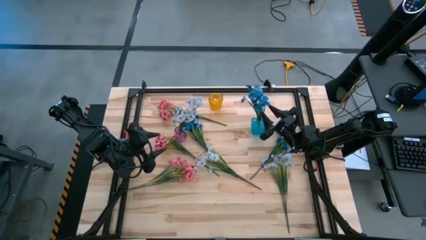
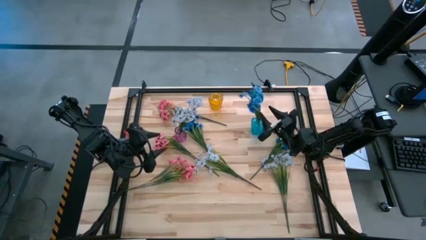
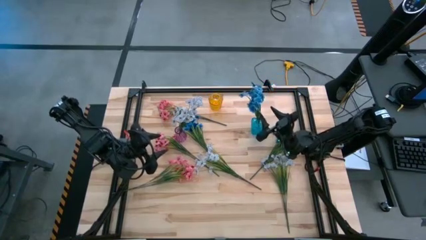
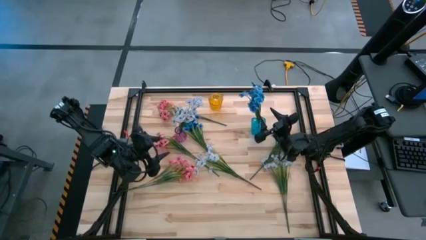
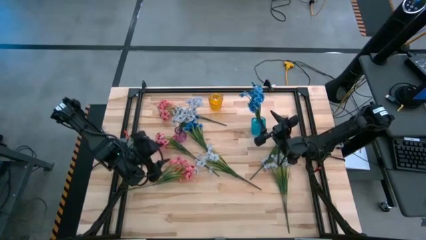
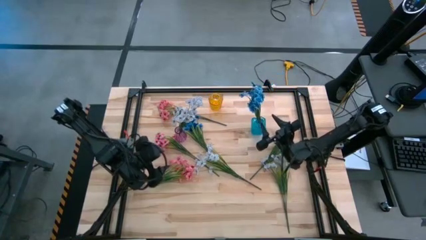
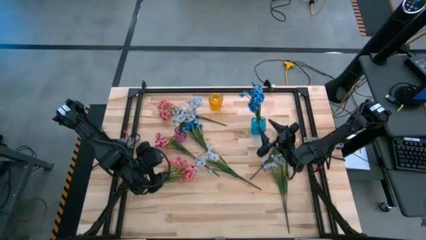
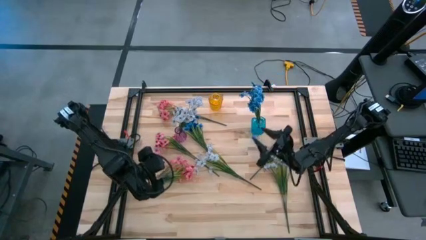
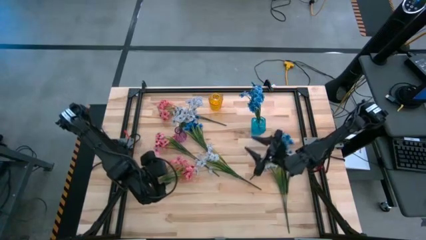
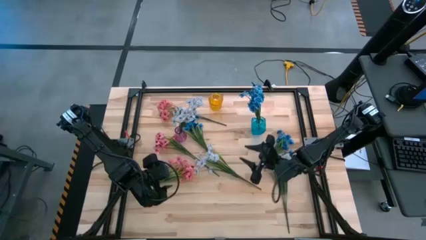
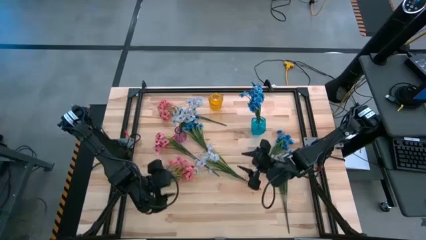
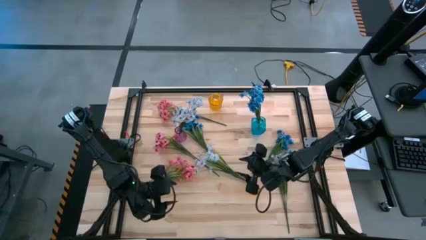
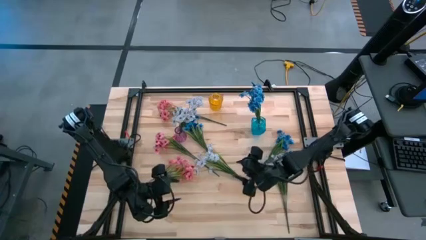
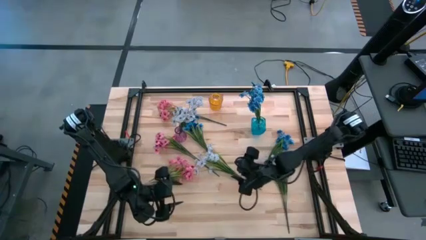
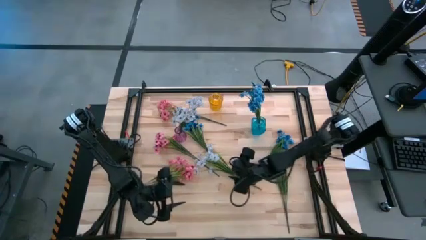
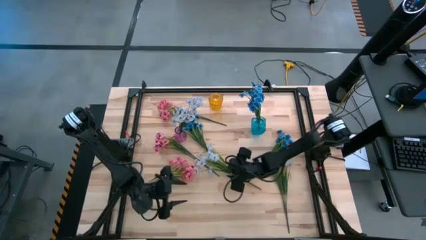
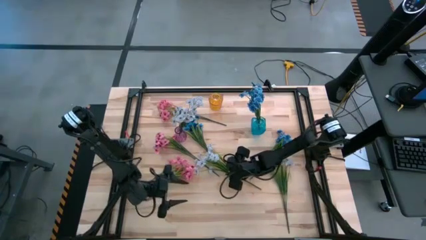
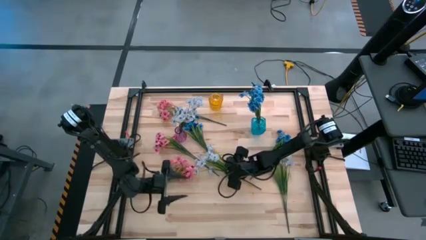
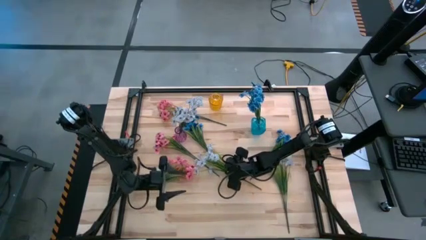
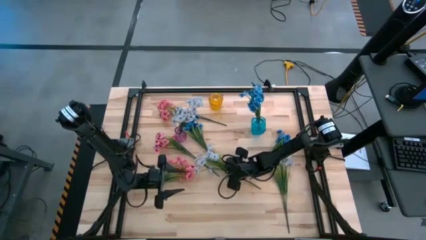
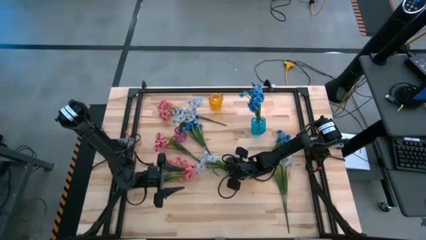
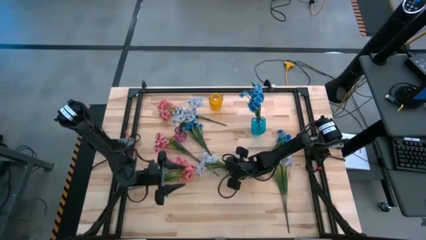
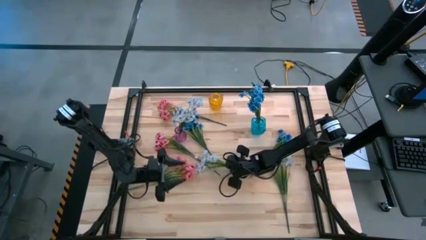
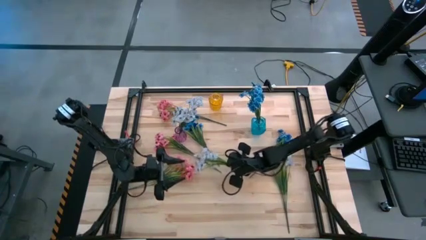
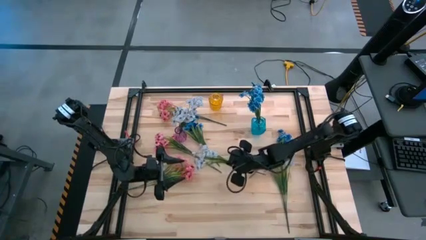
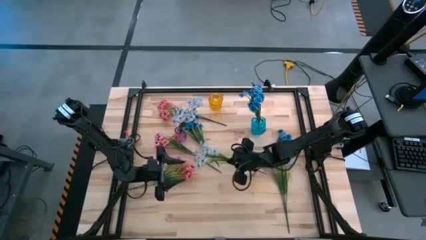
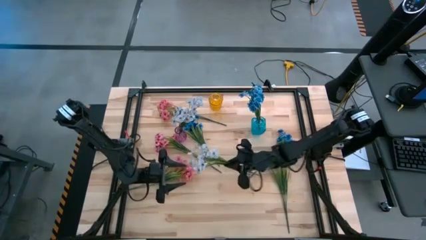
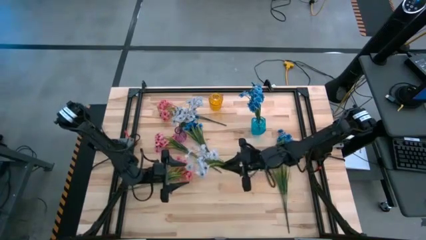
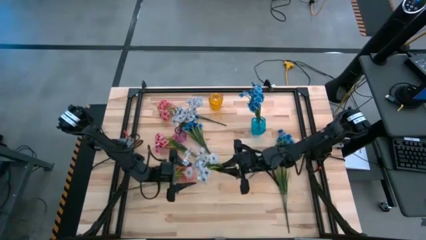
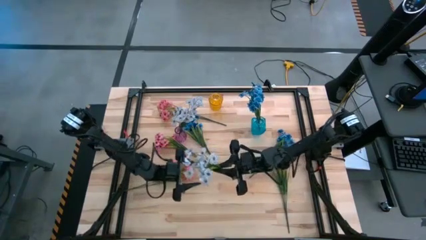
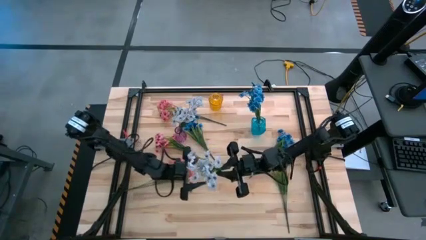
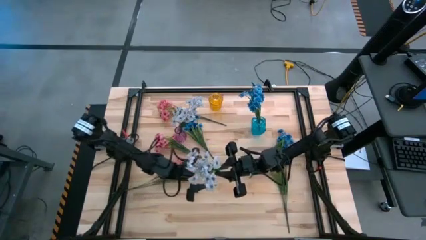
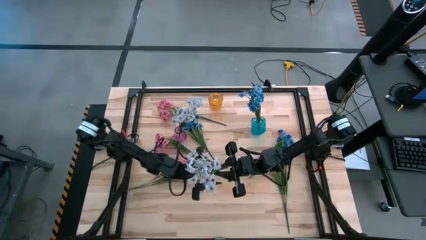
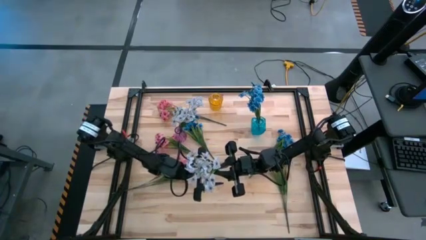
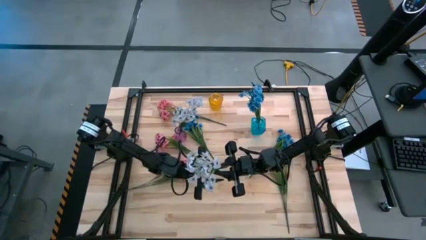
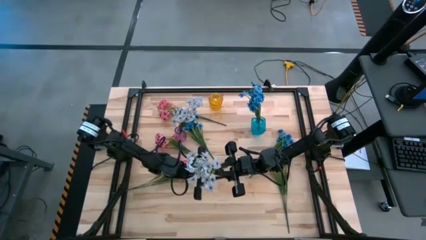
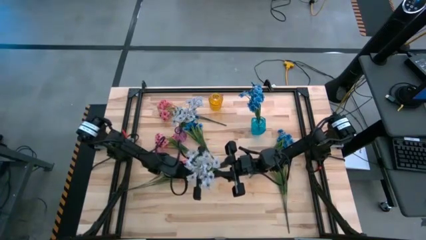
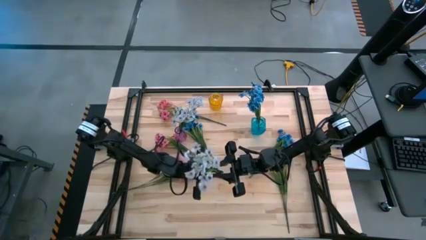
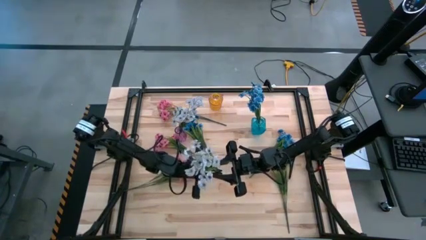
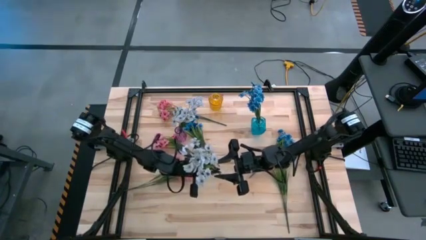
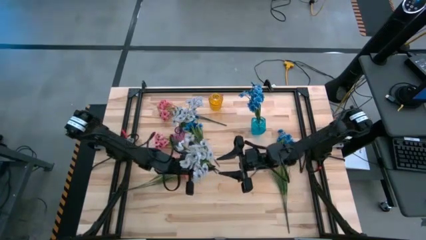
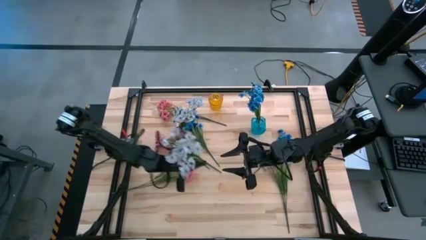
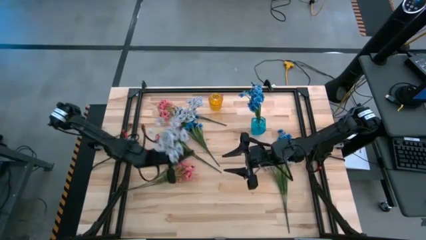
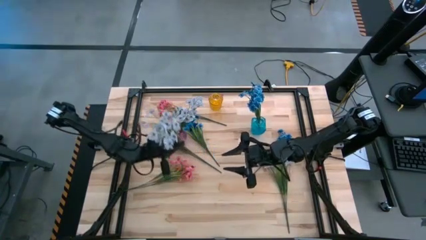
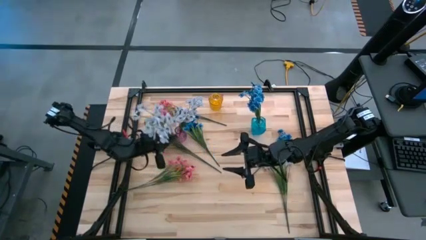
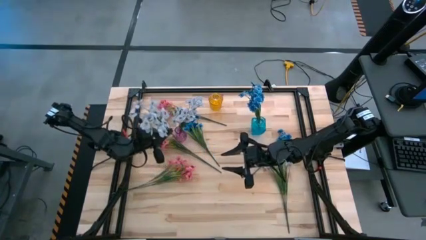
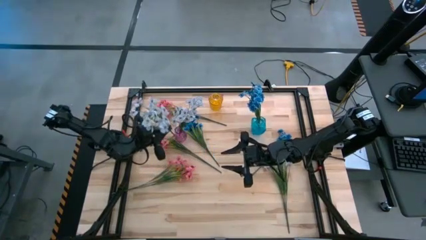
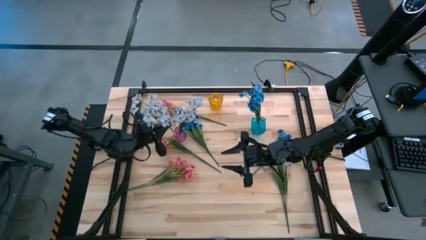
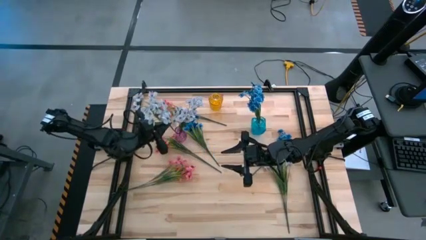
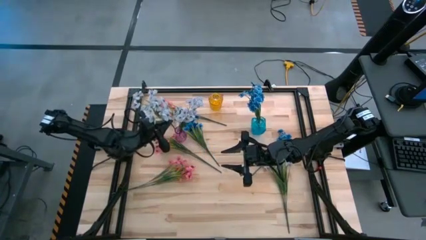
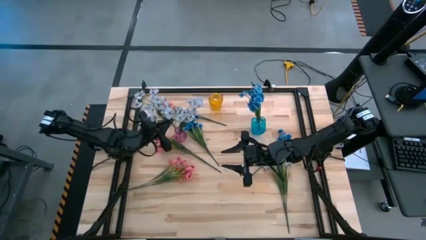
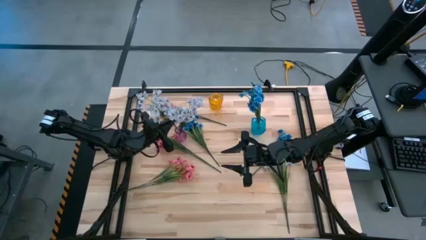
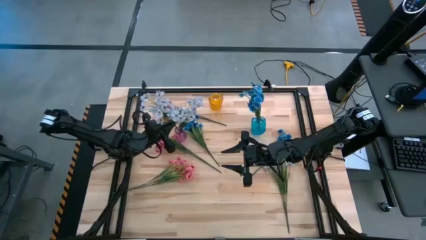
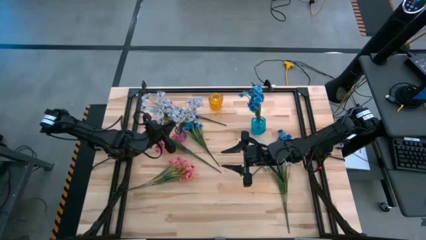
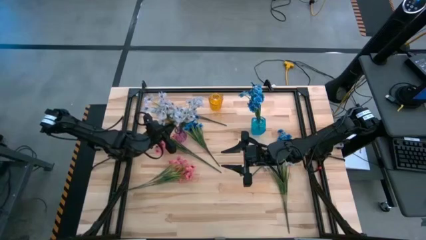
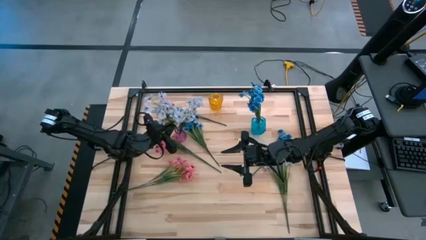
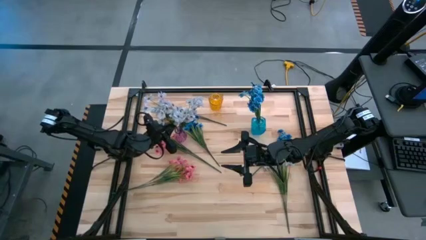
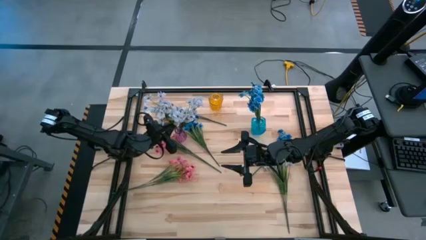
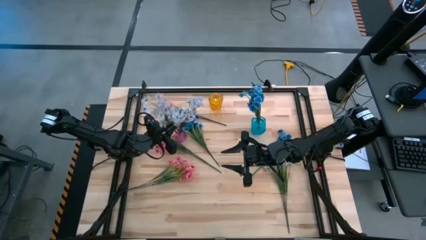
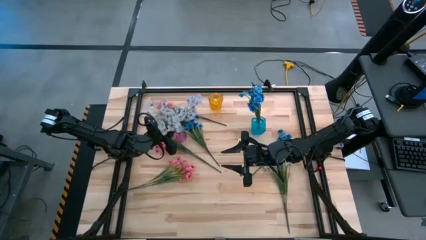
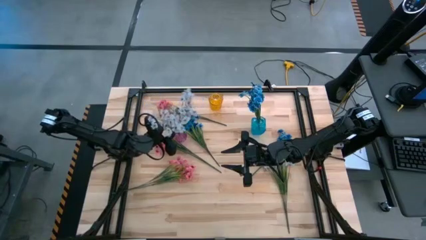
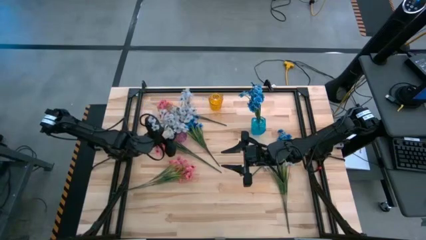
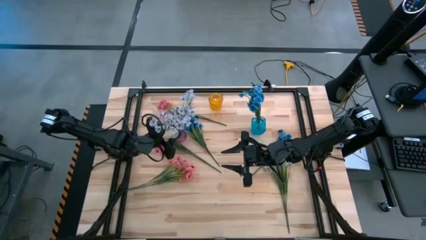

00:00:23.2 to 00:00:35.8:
Task: Sort flowers into vase by color
Put the left white flowers into the purple vase
